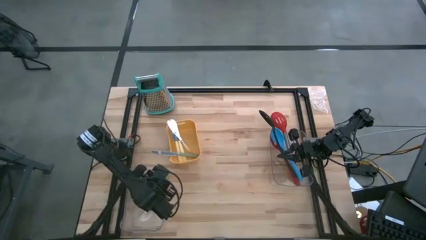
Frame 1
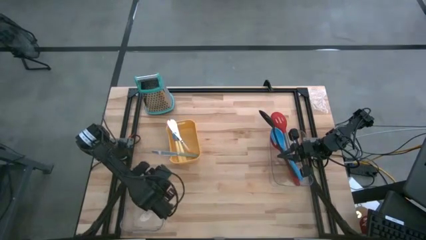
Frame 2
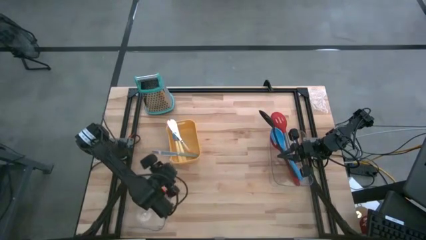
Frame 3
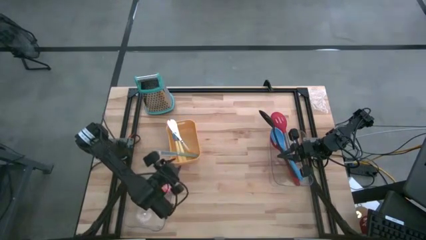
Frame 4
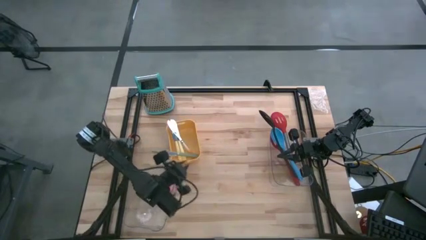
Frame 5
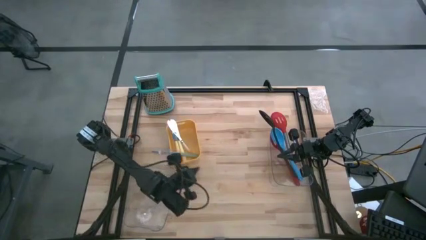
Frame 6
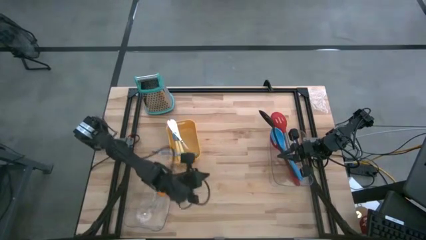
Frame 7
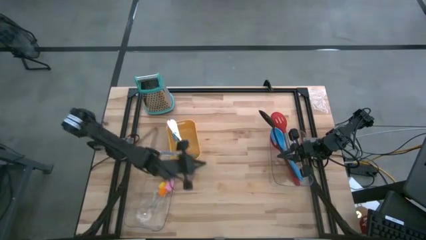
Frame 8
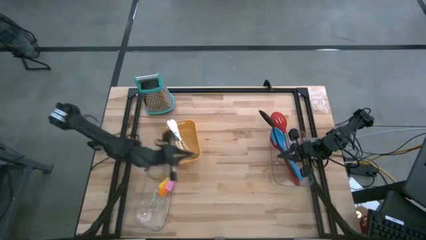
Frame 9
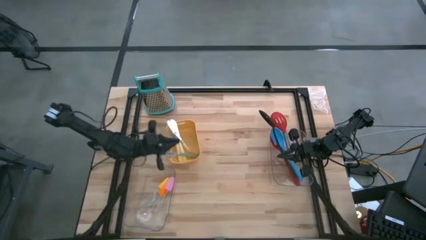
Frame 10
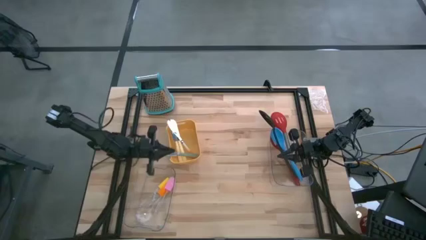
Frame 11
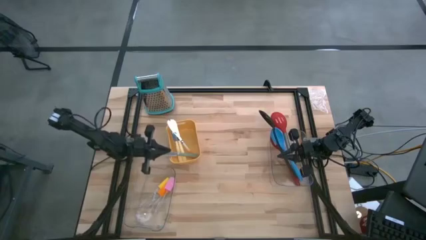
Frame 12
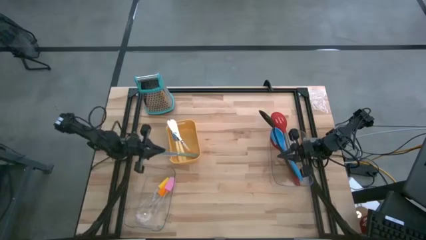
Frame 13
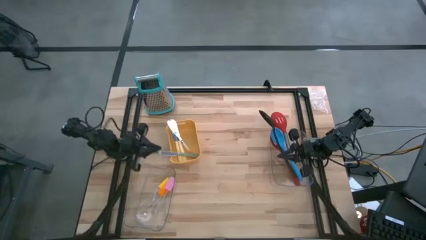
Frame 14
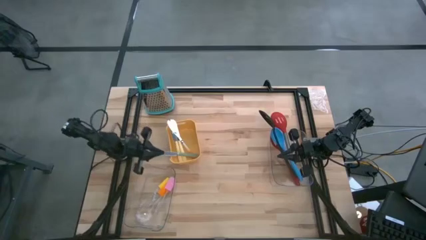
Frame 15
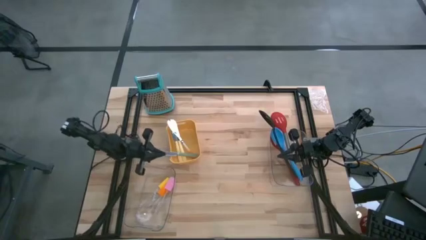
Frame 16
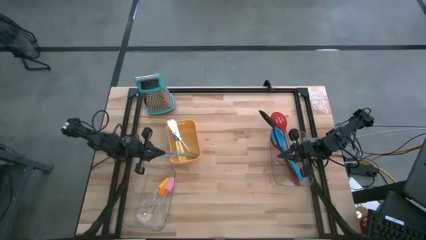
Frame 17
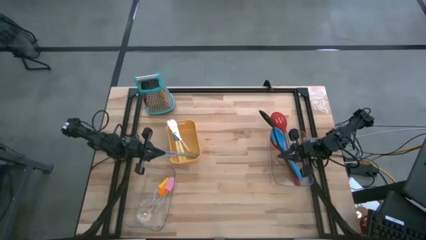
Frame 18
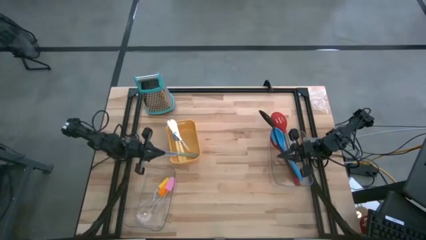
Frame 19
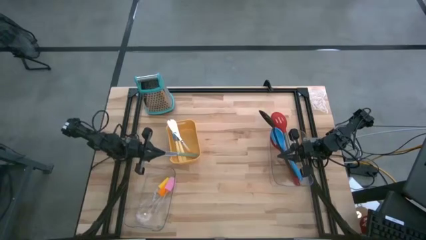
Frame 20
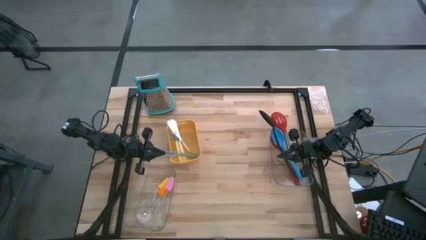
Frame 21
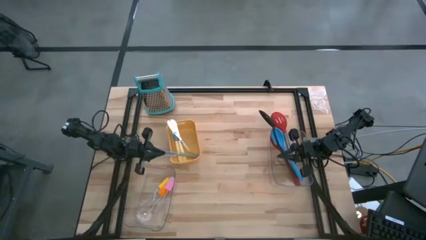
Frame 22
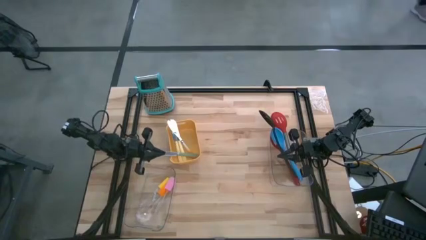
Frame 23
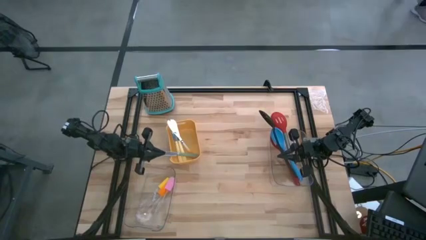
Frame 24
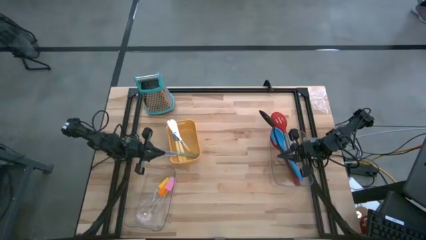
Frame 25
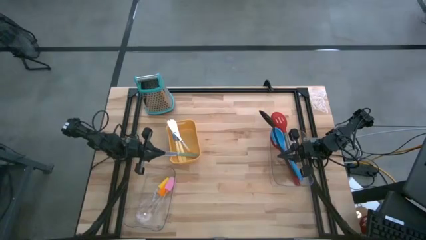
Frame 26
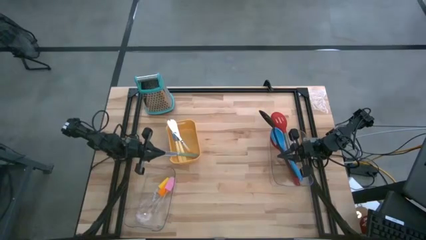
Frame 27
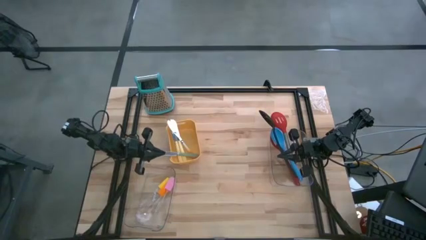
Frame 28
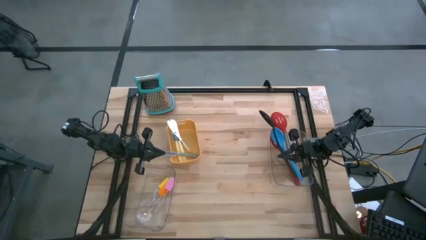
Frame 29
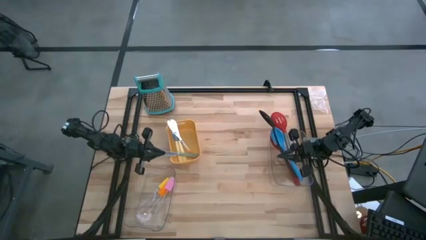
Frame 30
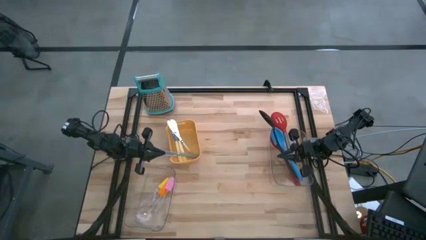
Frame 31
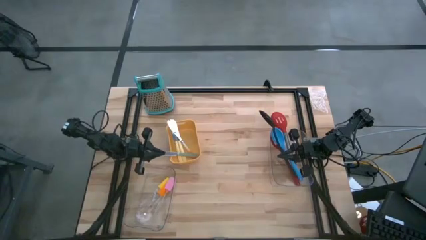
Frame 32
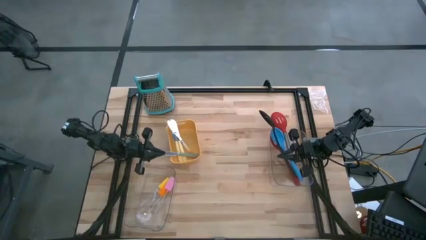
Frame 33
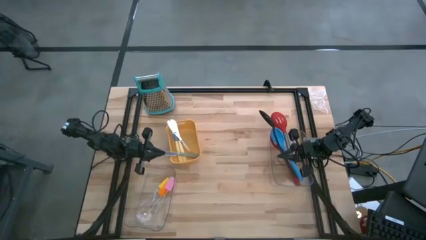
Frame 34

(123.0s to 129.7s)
Task: Pick & Place Kitchen Items
Return to Home Position

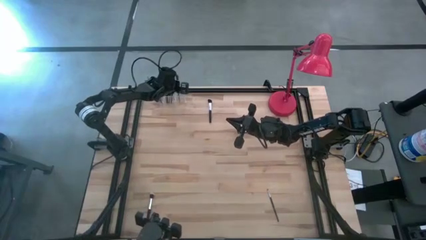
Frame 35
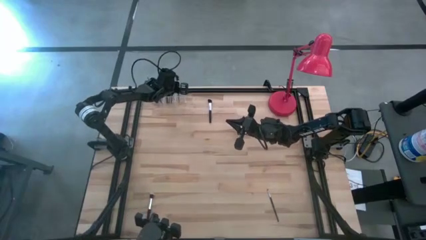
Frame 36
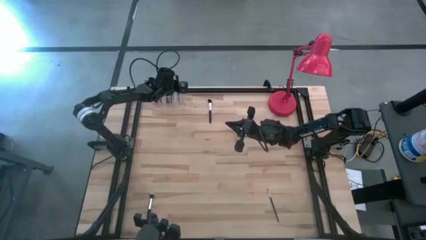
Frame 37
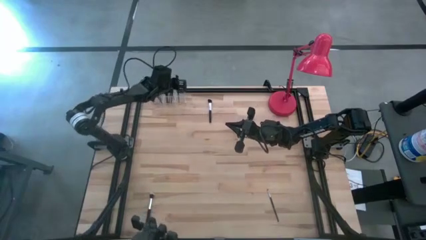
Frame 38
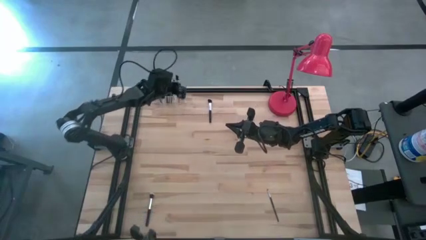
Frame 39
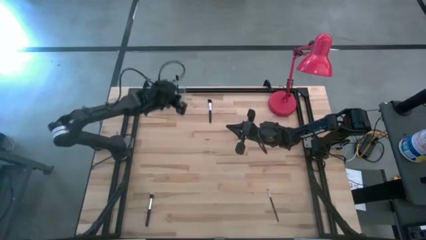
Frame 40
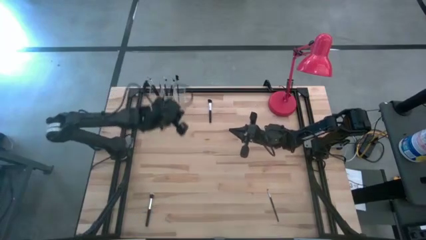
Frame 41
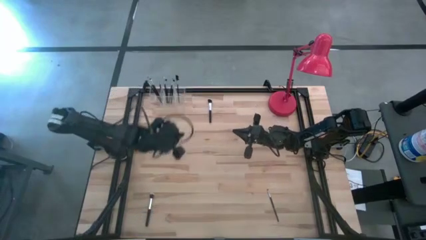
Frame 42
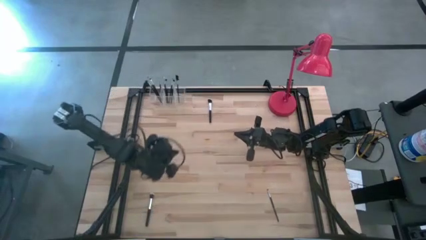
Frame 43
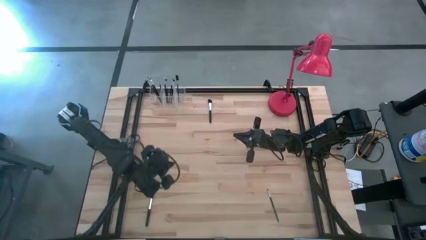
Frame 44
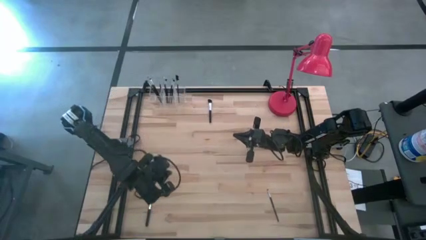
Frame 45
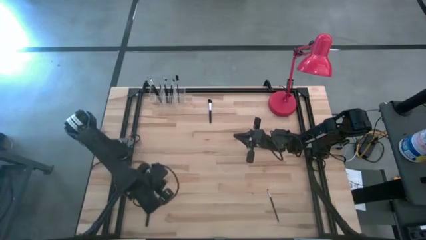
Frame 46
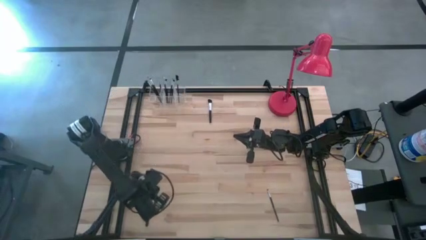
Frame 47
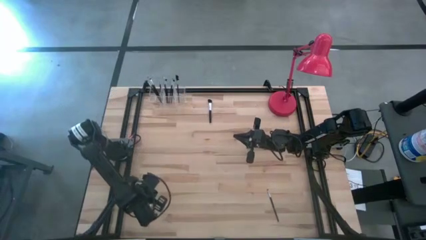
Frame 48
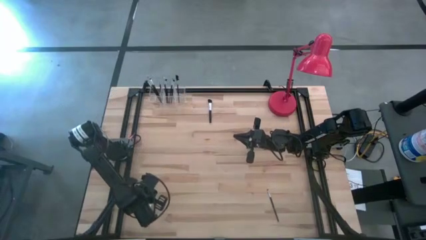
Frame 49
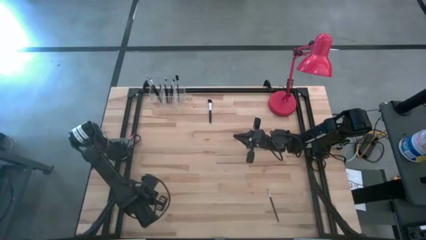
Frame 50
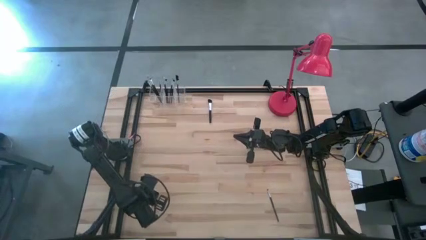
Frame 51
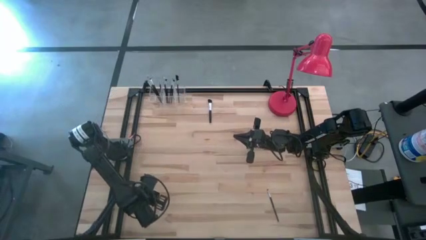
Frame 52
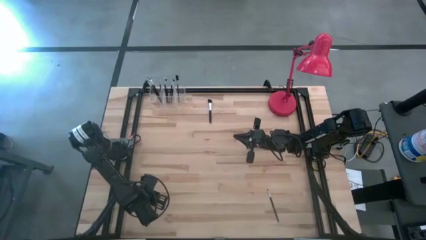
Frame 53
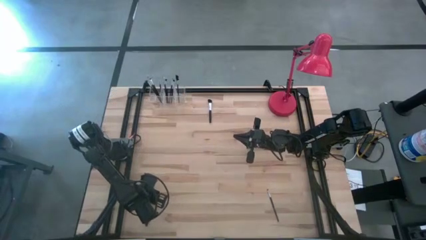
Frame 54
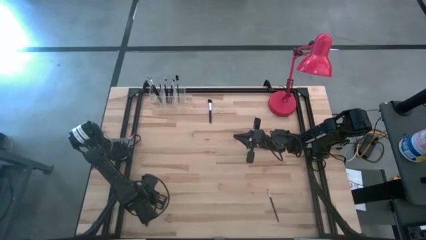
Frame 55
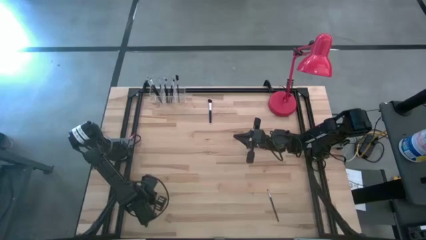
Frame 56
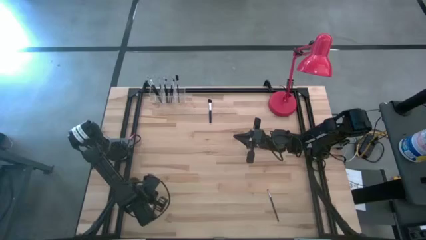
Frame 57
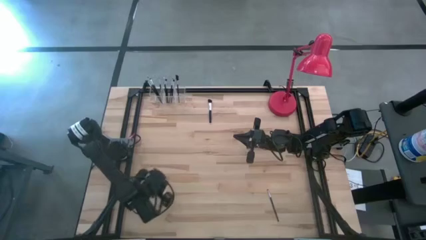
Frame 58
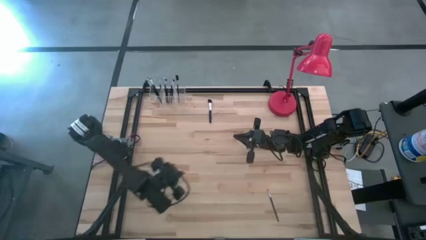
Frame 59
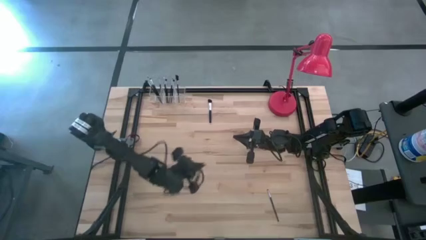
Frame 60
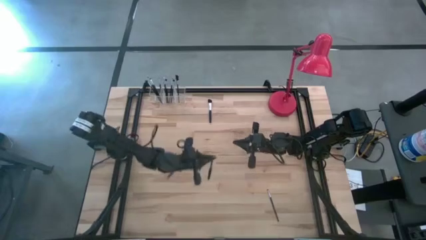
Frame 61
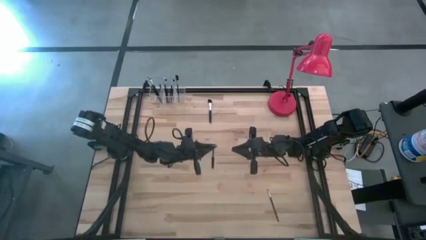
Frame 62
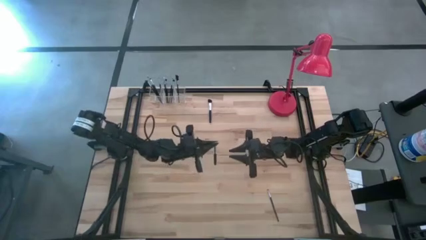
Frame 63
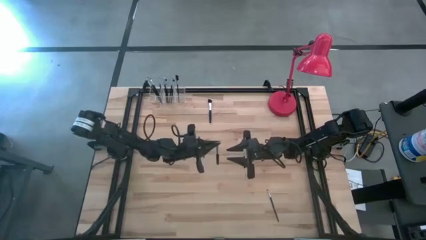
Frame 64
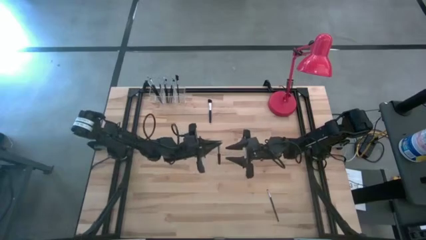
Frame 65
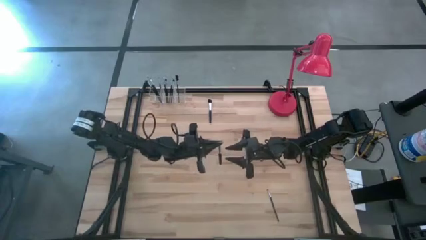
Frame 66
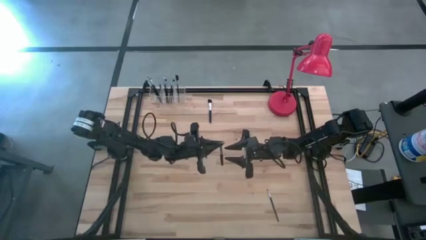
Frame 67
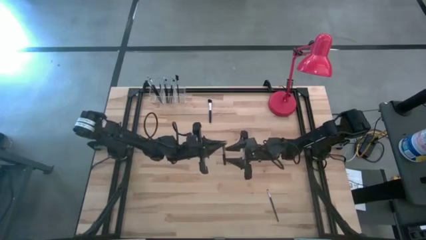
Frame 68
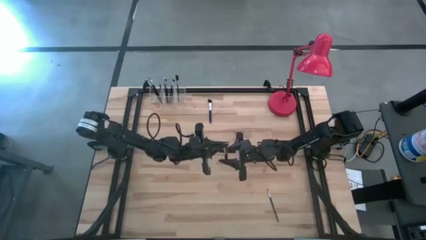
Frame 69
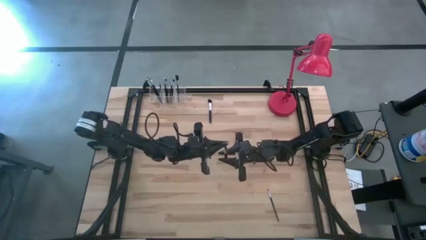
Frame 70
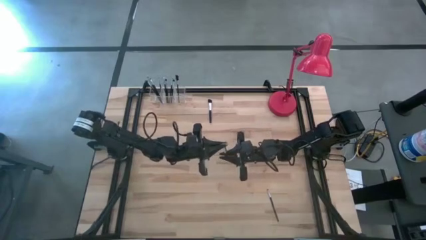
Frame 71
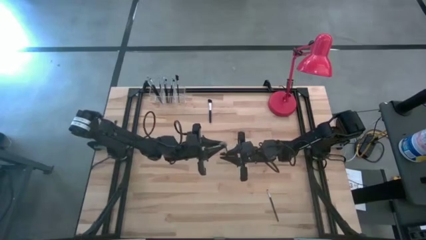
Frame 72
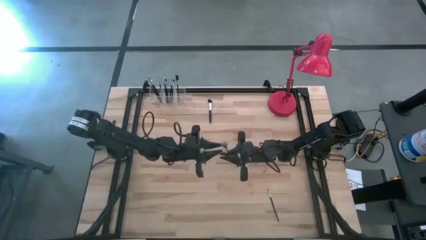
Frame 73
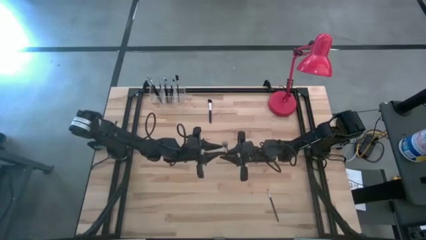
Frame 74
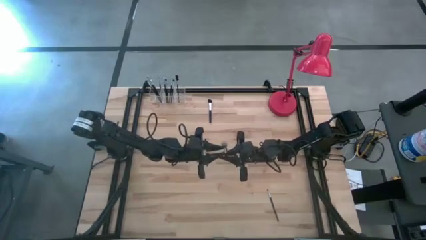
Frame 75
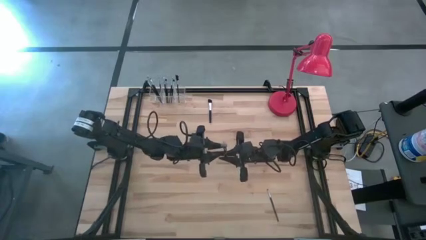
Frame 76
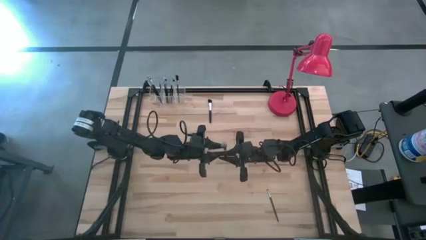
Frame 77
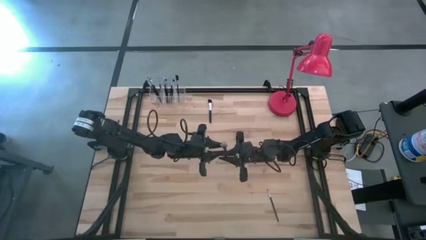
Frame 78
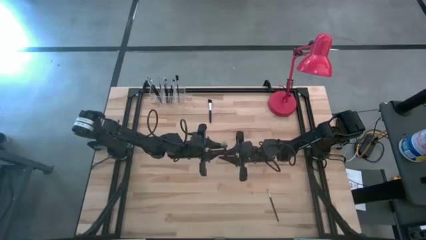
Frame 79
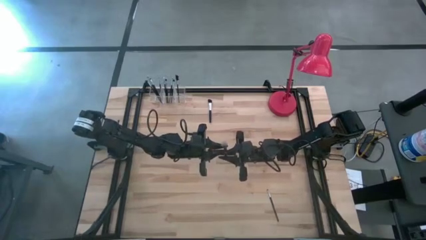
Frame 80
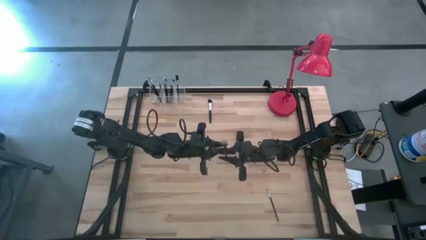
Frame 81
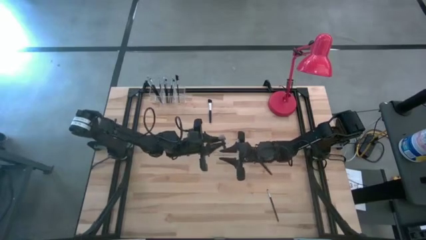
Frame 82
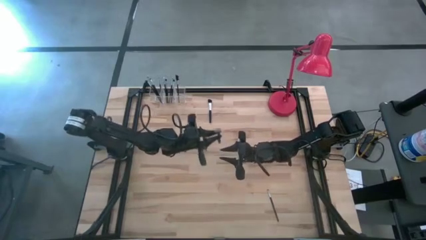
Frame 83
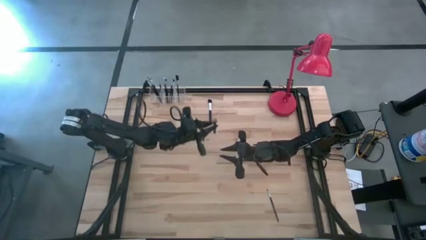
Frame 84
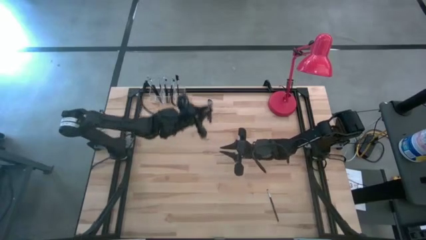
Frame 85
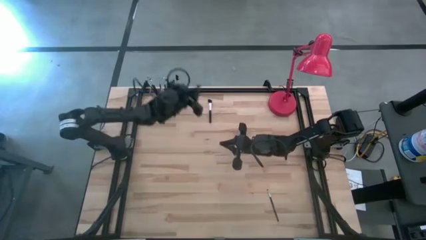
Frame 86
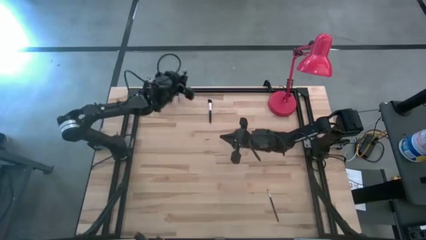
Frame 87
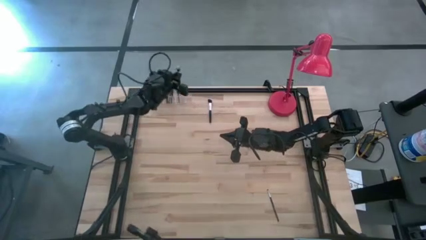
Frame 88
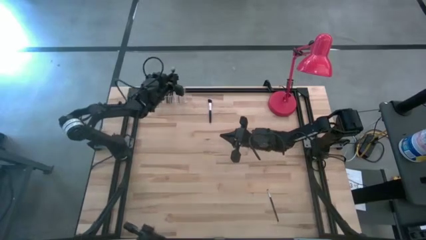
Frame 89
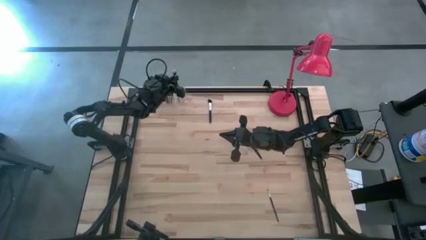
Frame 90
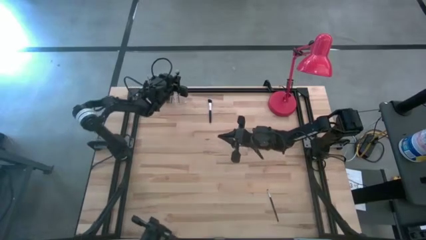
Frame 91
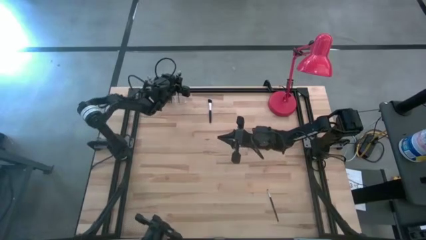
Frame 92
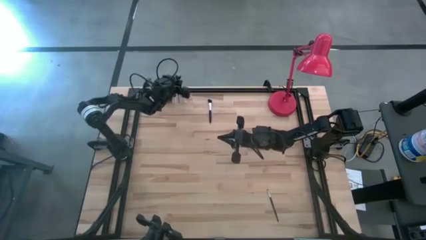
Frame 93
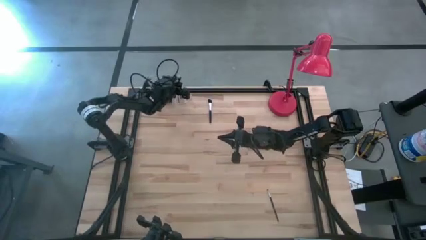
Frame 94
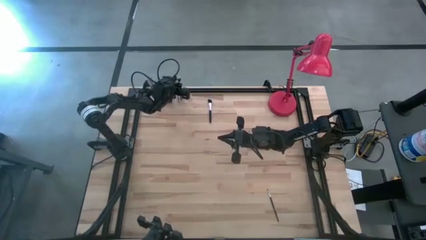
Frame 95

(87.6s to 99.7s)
Task: Pick & Place Makeup Brushes
Put the blush brush into the transparent organizer
